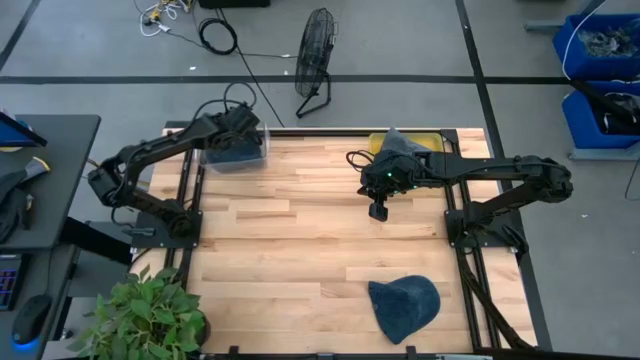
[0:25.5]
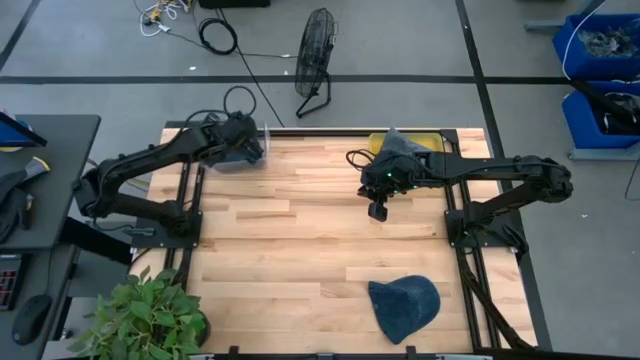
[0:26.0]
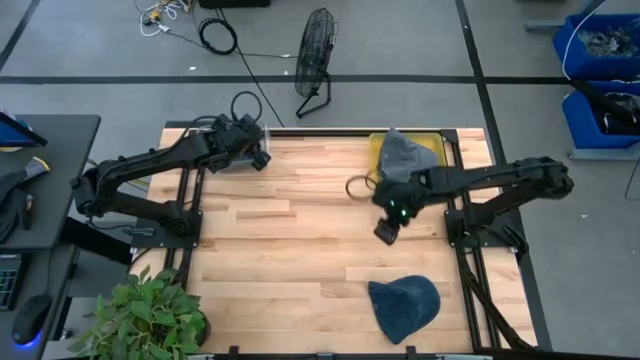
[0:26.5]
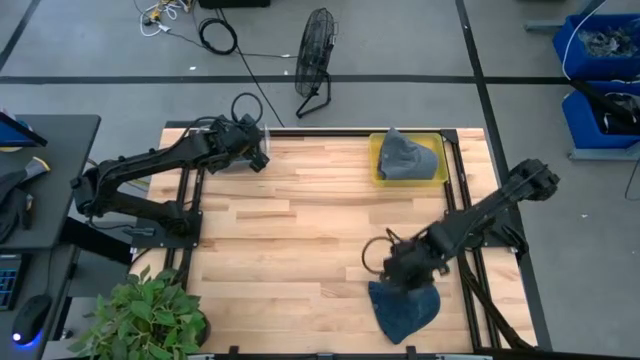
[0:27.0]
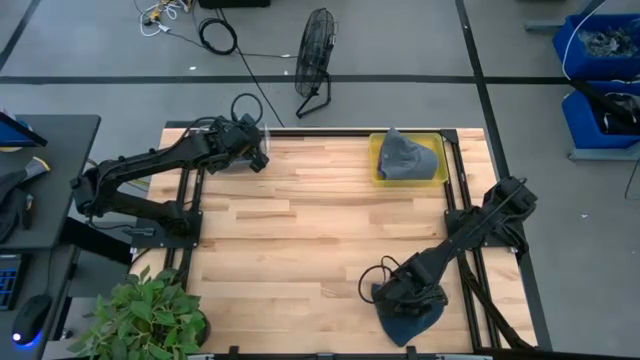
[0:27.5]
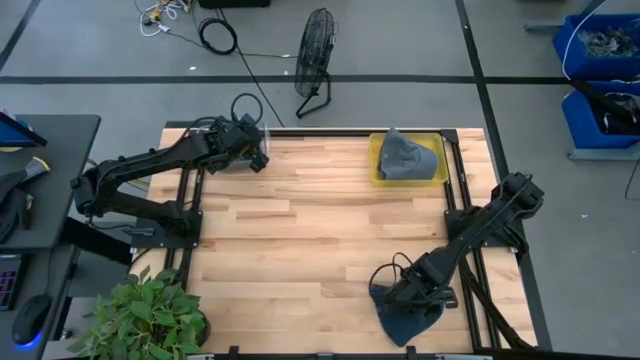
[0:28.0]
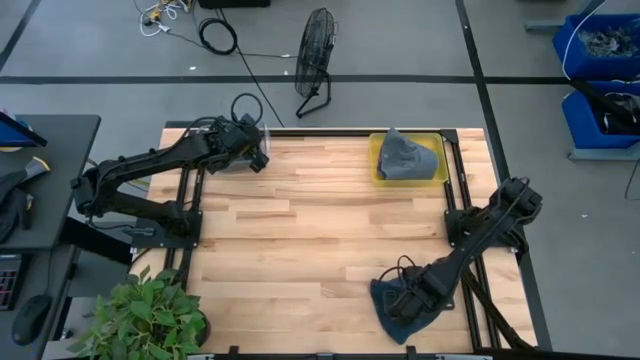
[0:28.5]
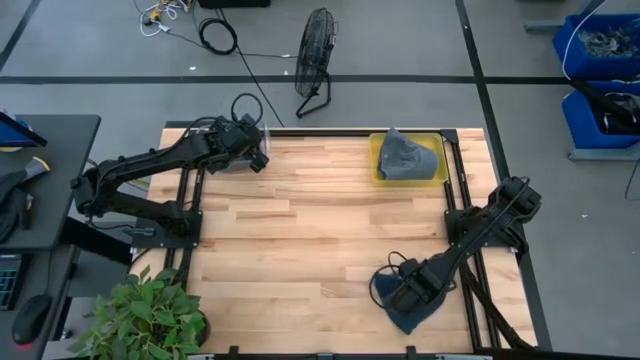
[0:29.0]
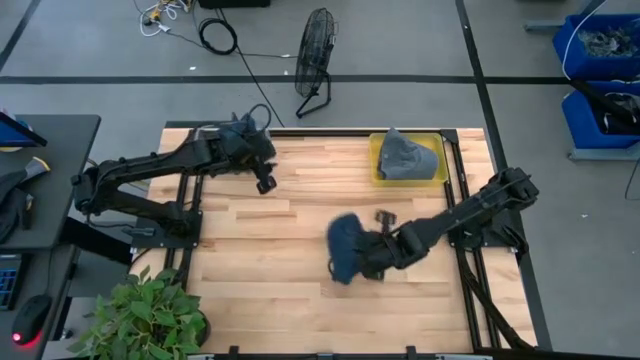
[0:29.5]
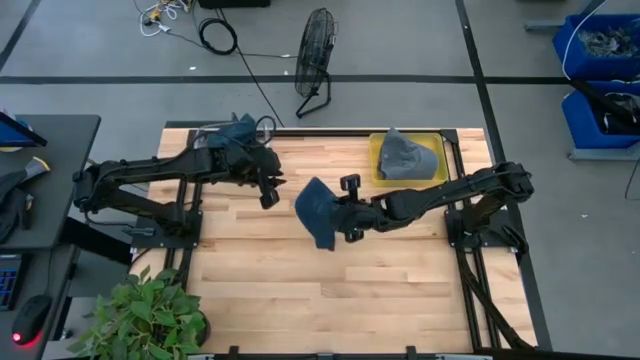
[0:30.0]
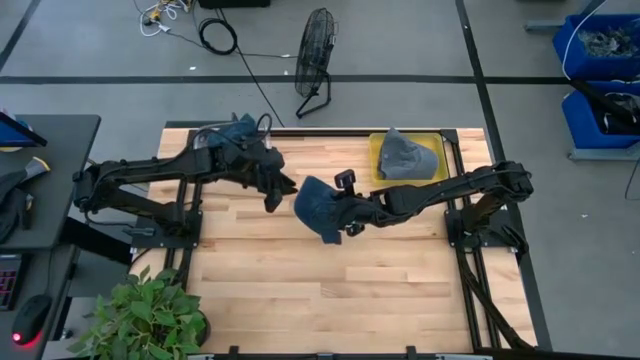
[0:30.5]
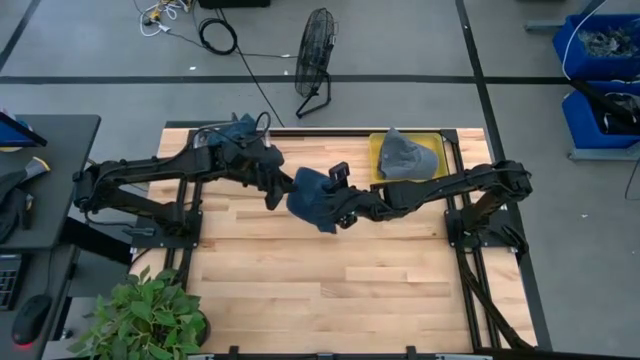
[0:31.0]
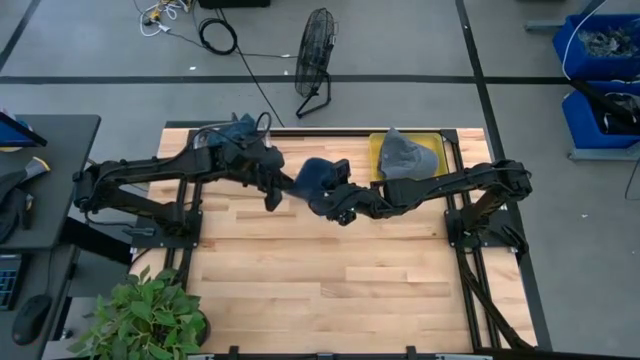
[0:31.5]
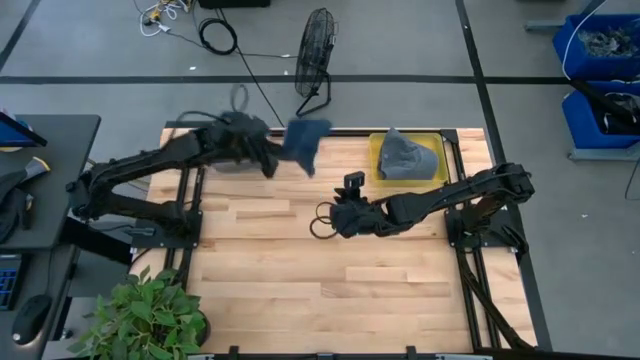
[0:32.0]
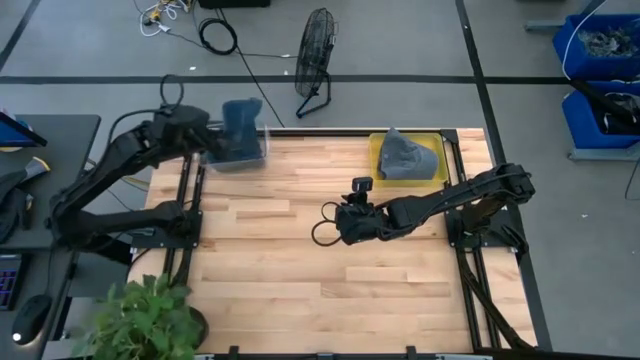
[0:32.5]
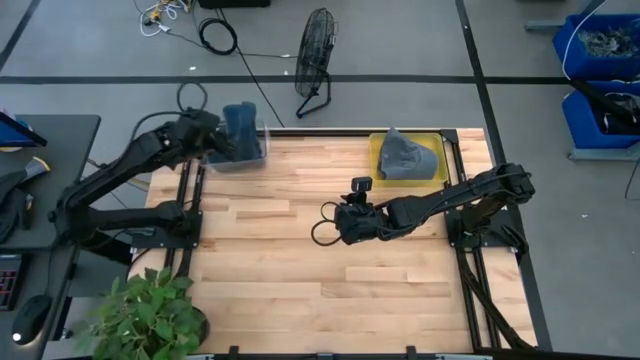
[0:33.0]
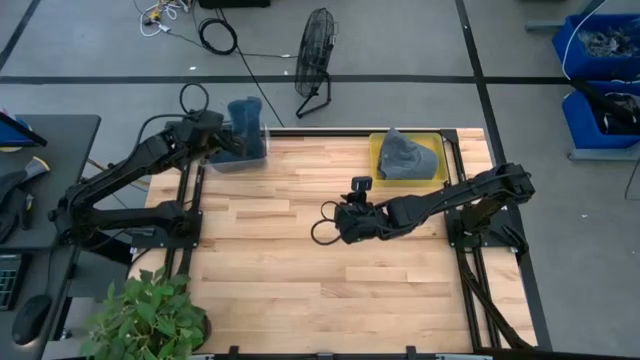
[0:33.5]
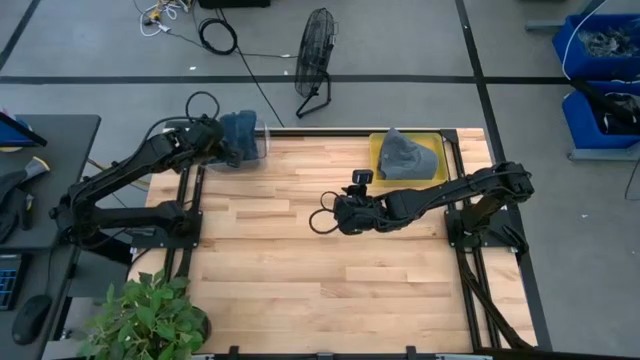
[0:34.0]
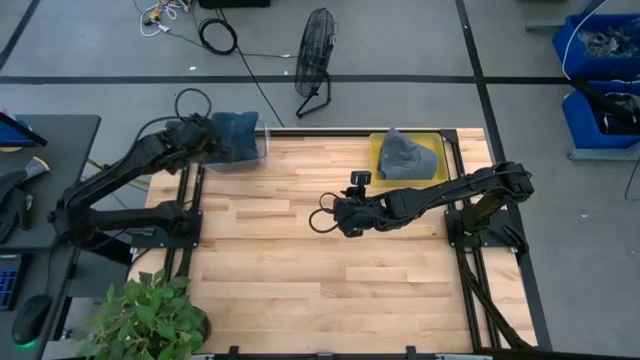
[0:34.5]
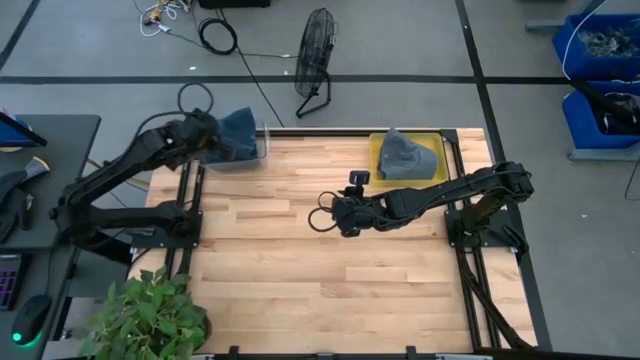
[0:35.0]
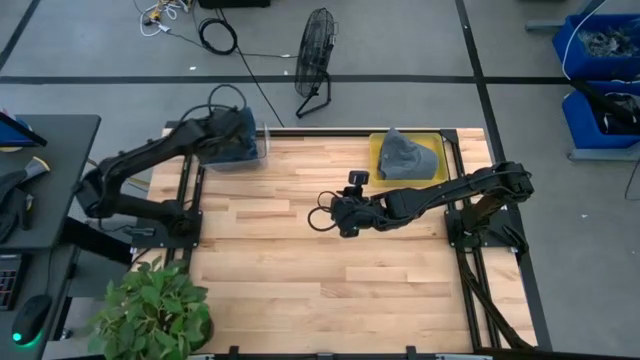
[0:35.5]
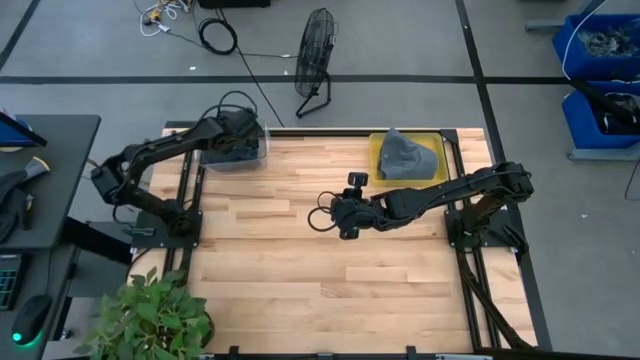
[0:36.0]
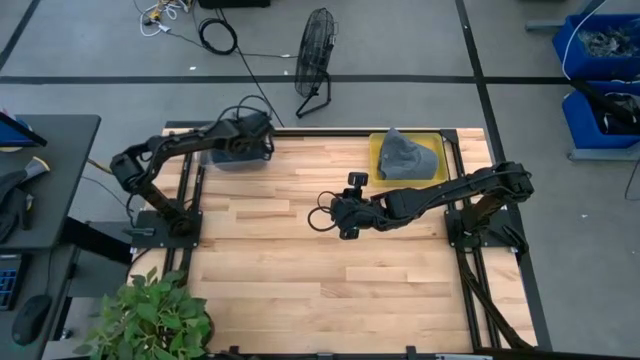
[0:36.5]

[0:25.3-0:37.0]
Task: Pick & Place hat
Put the blue cap into the transparent bin

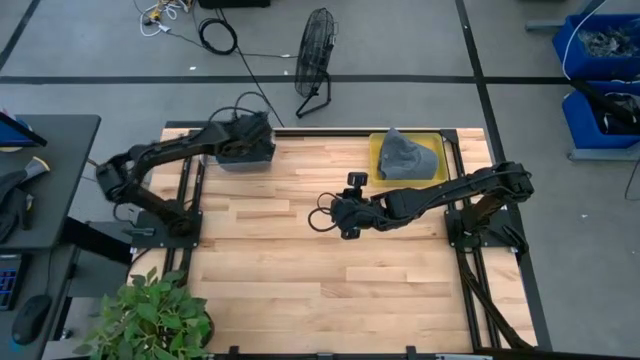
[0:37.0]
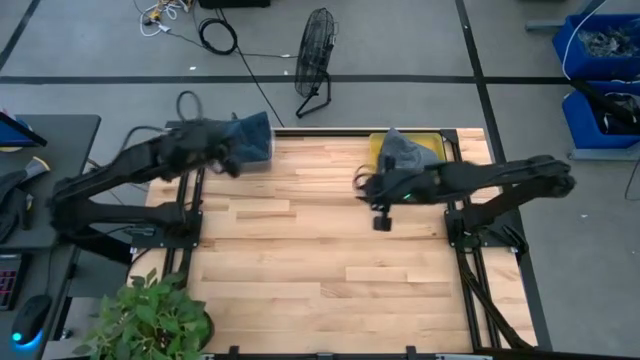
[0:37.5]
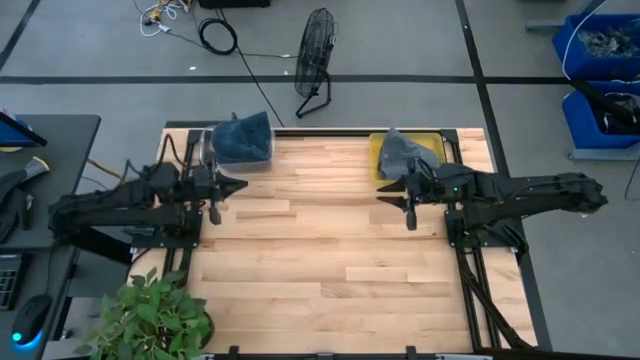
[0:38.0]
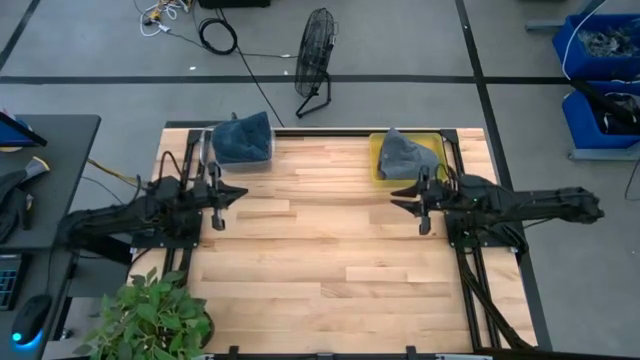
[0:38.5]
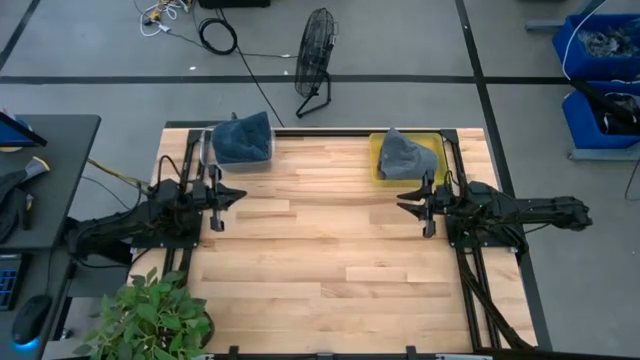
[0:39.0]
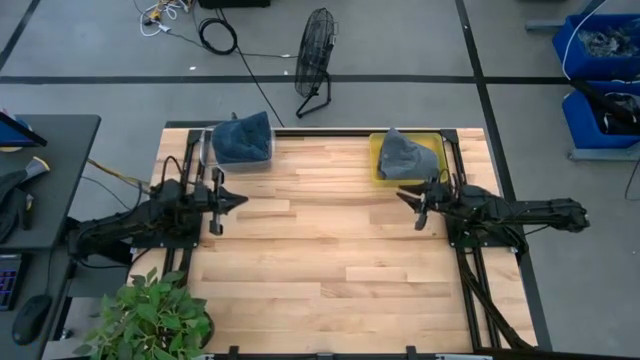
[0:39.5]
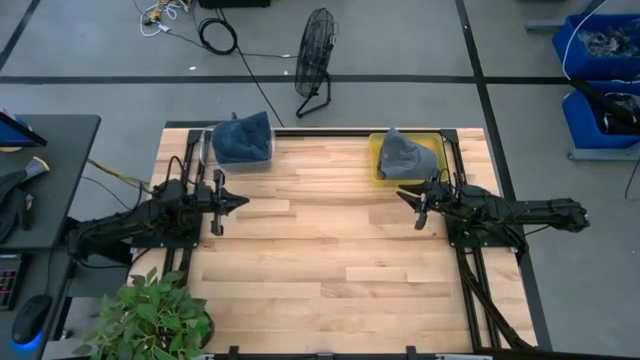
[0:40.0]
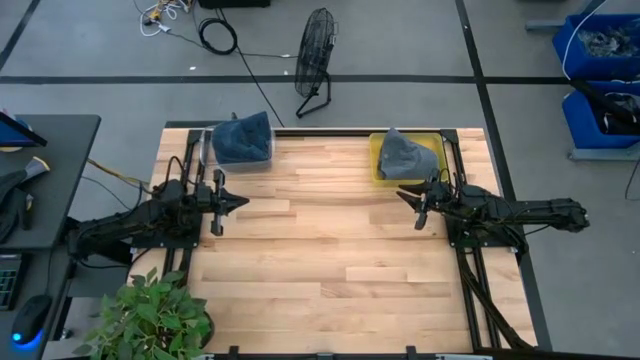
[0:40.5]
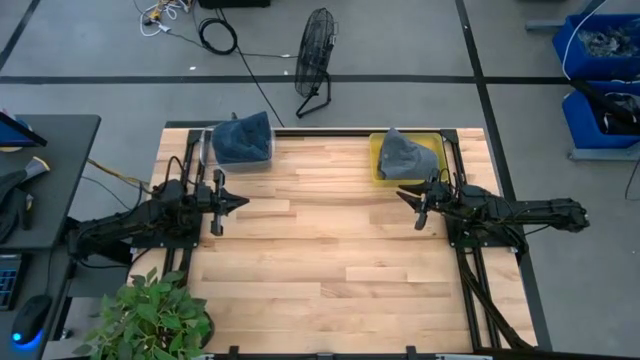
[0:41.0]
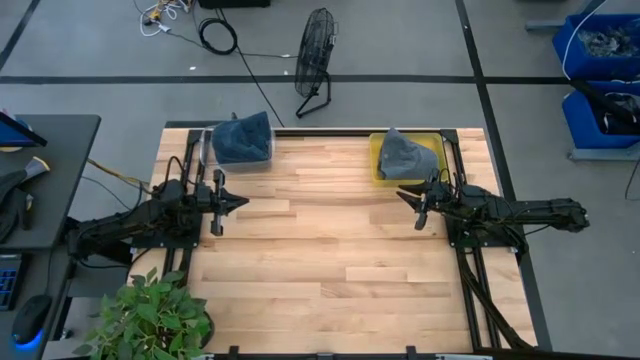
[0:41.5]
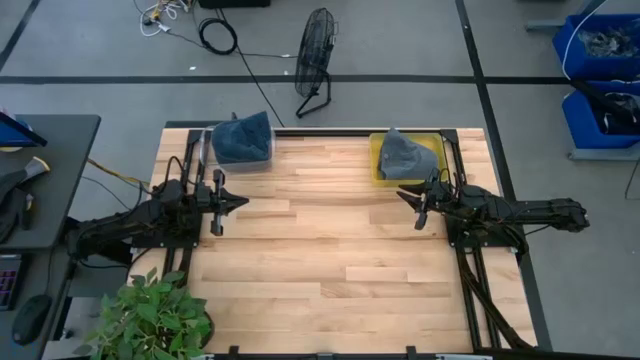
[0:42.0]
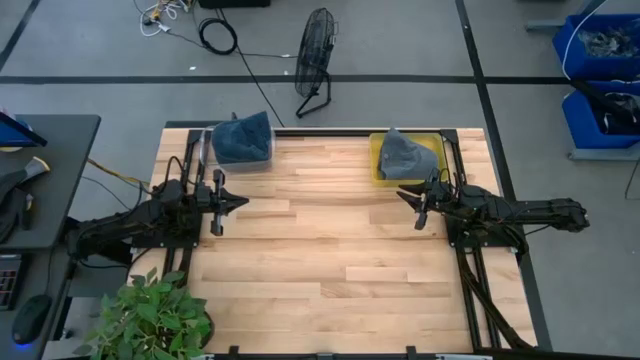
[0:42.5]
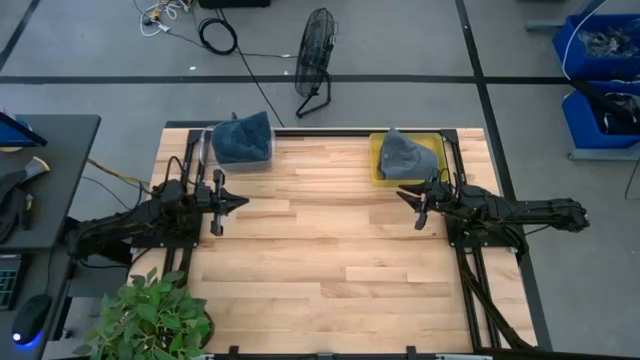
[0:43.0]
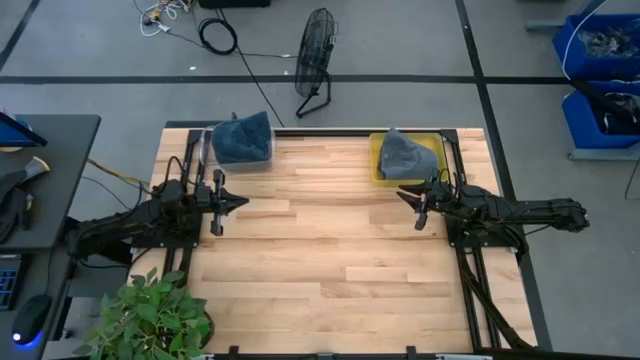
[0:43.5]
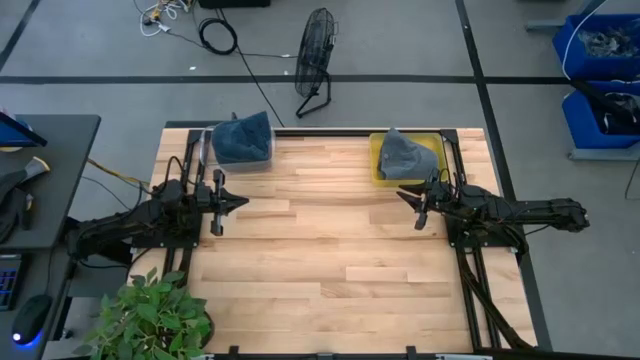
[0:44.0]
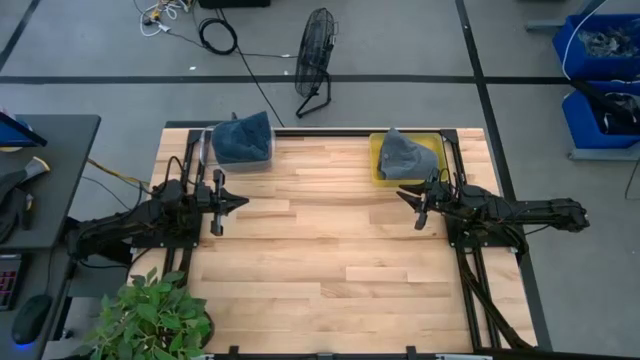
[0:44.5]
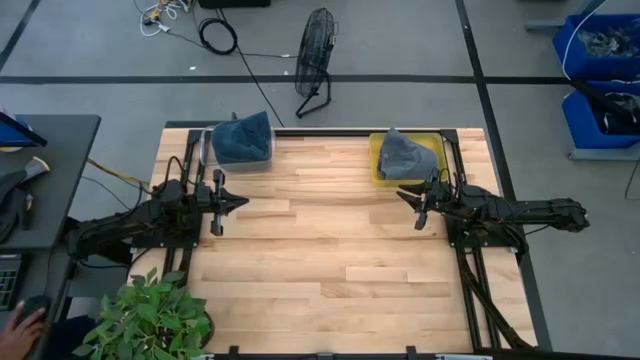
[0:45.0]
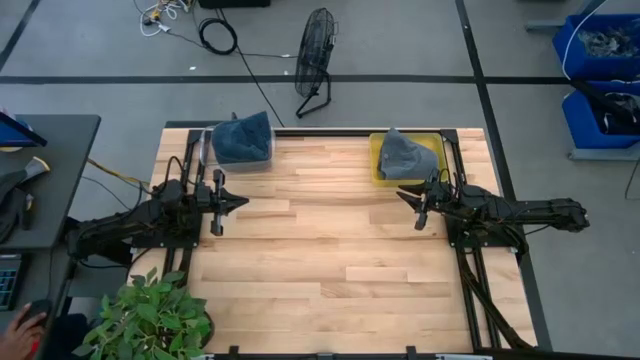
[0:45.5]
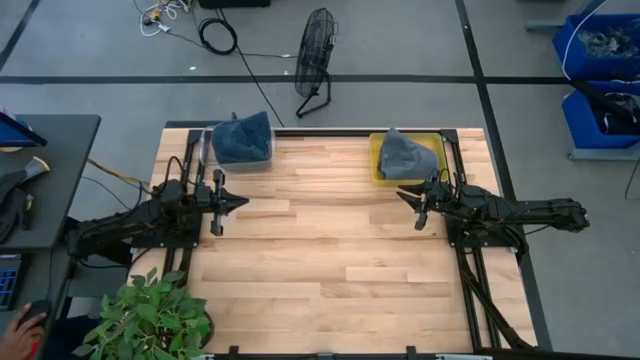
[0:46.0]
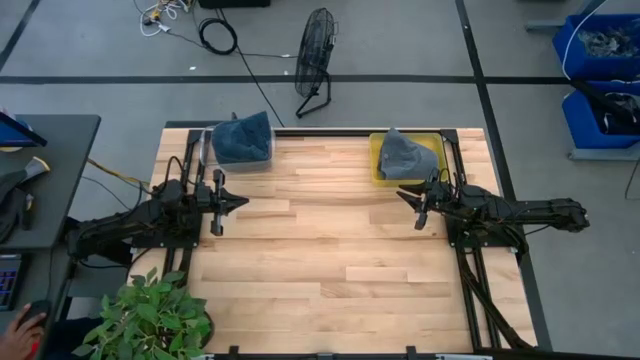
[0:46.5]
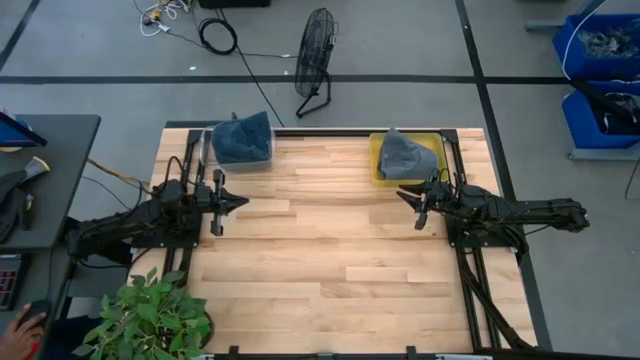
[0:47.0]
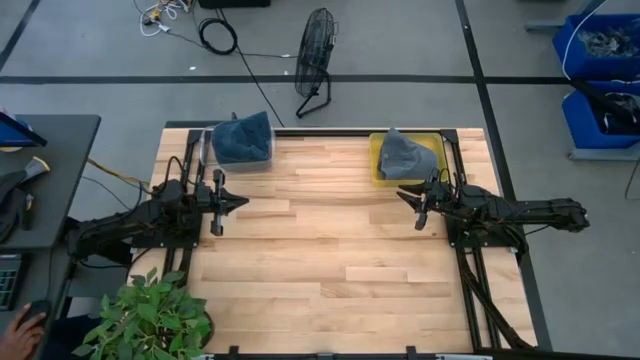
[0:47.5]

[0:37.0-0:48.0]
Return to Home Position
